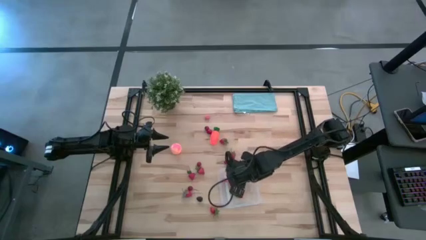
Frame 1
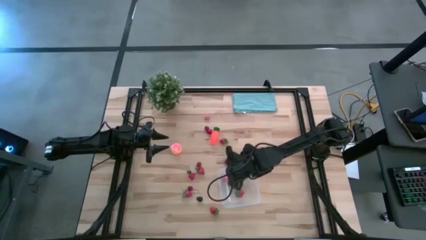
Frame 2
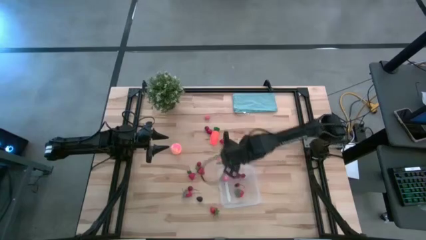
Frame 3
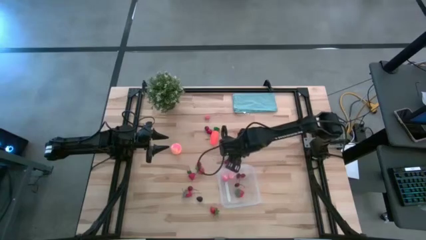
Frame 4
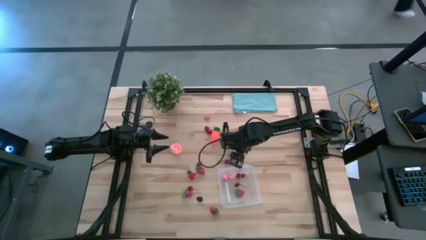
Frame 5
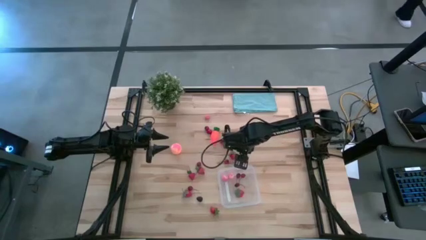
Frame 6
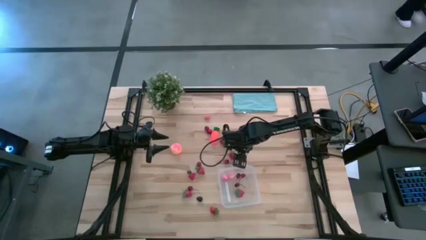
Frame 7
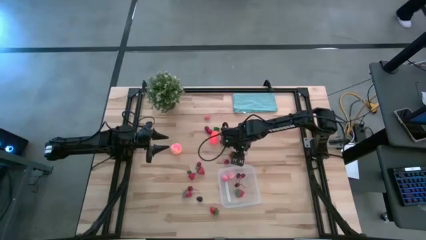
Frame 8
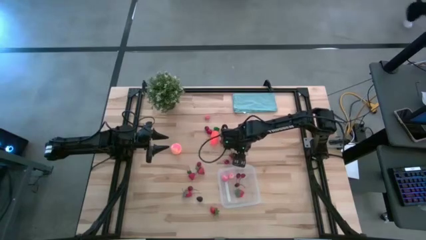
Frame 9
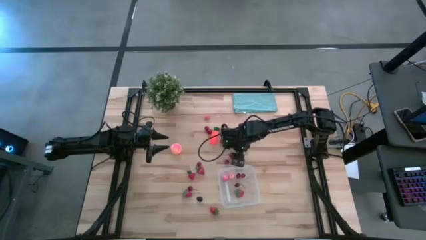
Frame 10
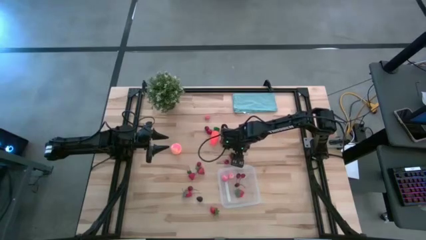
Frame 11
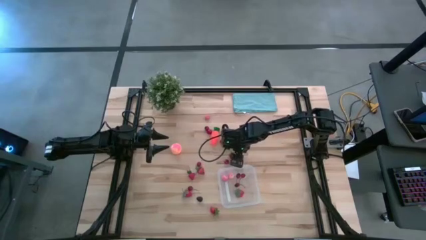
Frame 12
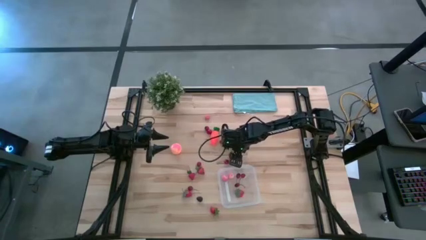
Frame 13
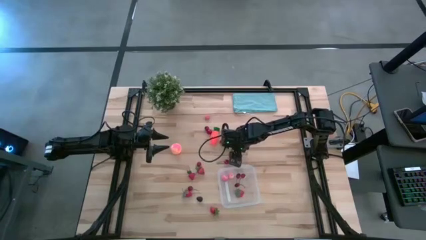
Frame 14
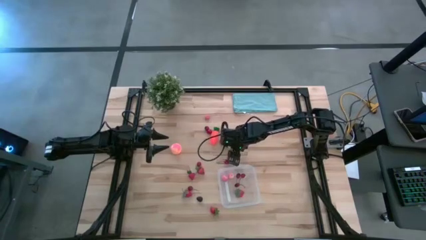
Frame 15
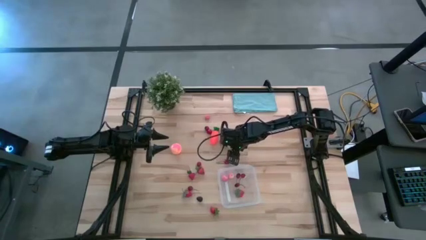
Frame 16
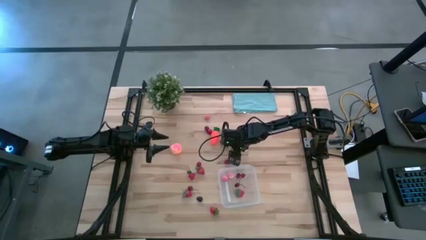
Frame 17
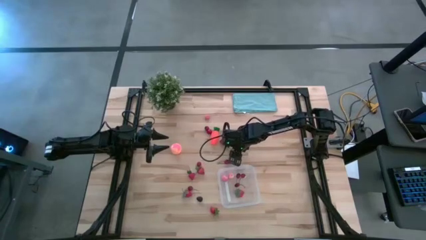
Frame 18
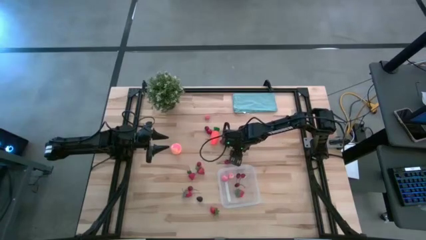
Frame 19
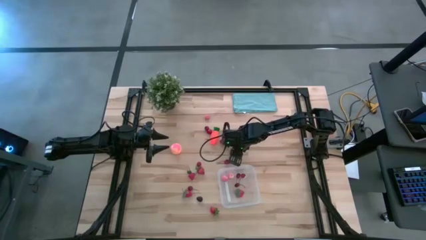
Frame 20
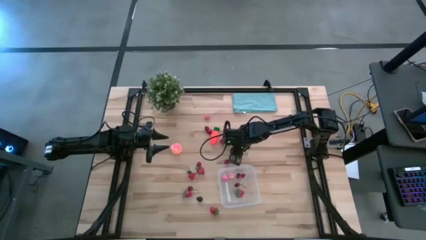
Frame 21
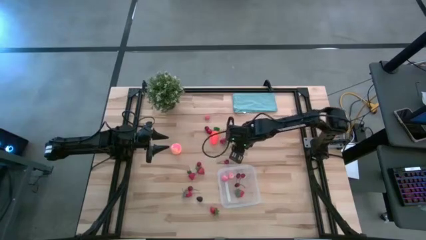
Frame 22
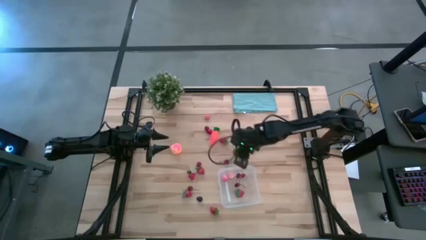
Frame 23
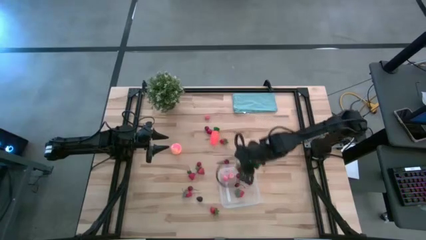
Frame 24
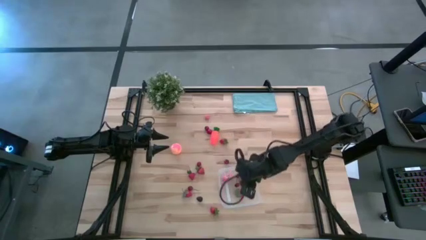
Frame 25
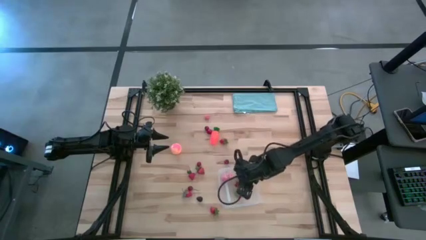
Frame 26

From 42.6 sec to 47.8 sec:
Task: Pick and placing Produce into tupperware
Put the red strawberry into the transparent container

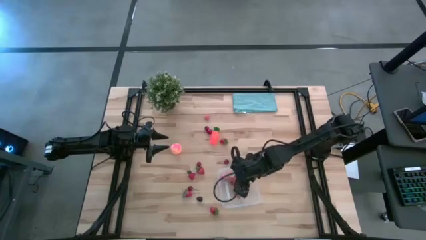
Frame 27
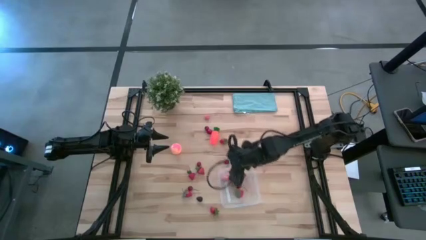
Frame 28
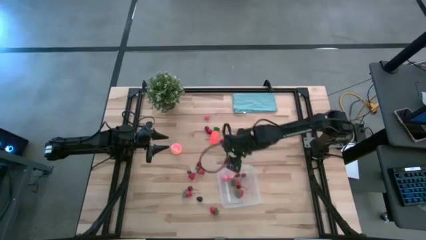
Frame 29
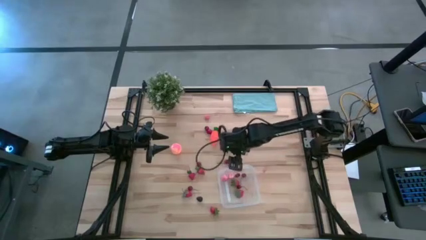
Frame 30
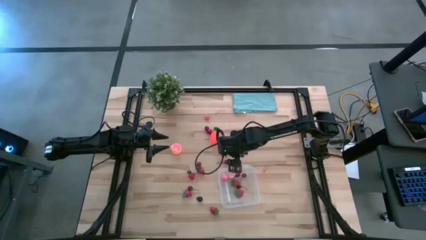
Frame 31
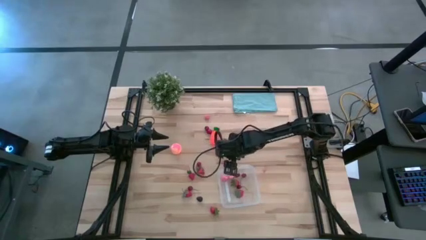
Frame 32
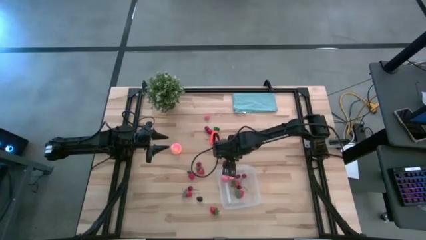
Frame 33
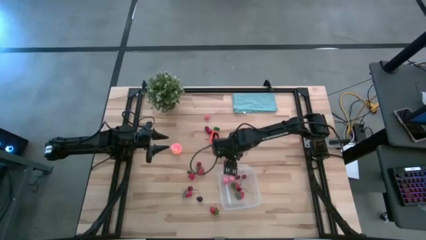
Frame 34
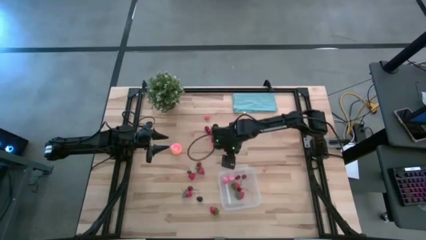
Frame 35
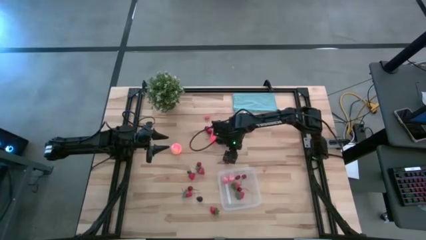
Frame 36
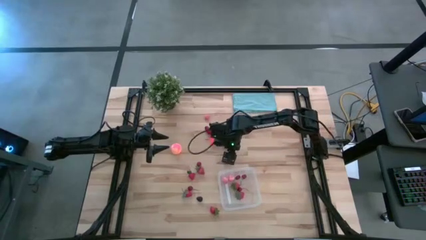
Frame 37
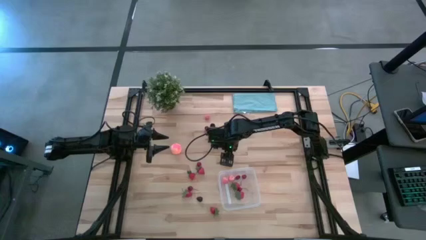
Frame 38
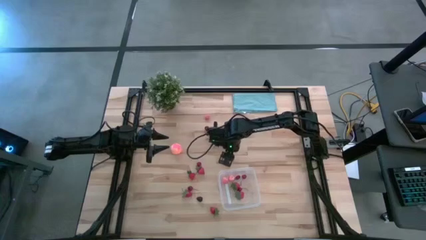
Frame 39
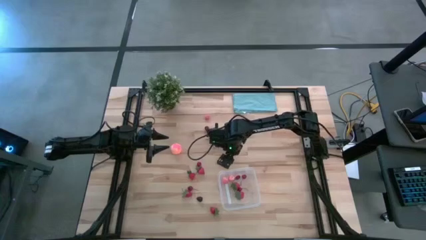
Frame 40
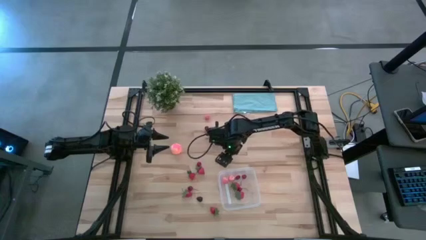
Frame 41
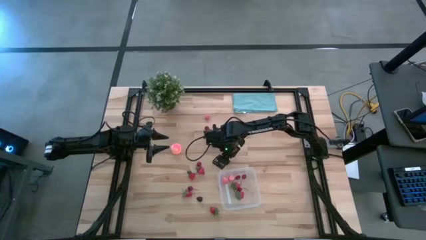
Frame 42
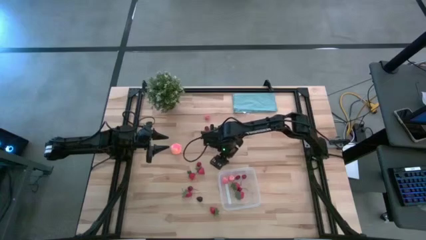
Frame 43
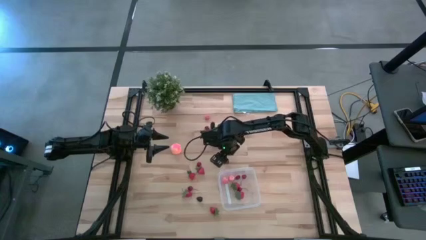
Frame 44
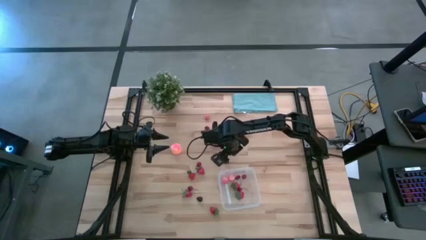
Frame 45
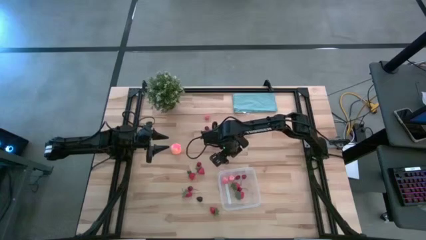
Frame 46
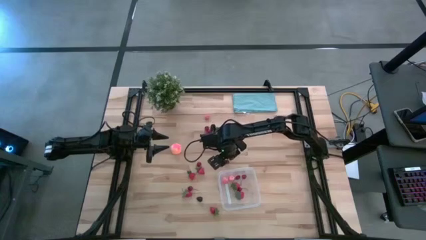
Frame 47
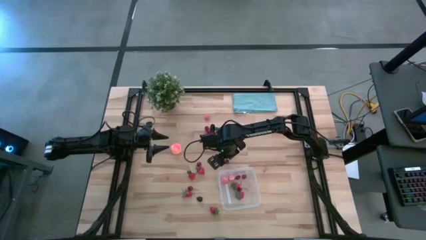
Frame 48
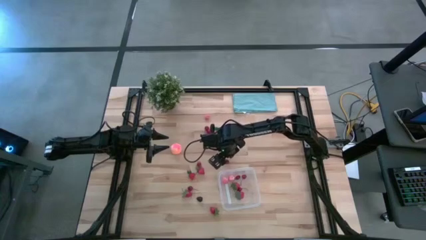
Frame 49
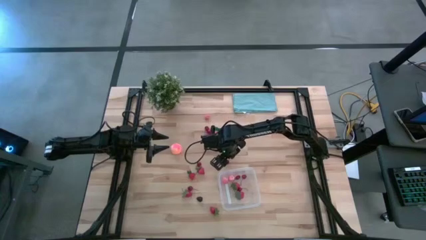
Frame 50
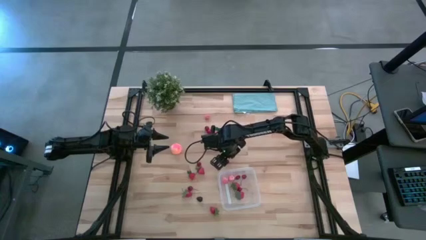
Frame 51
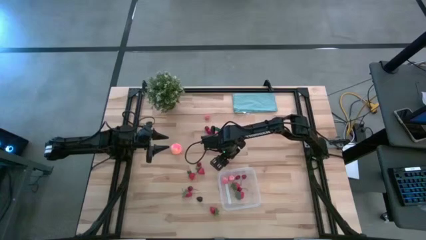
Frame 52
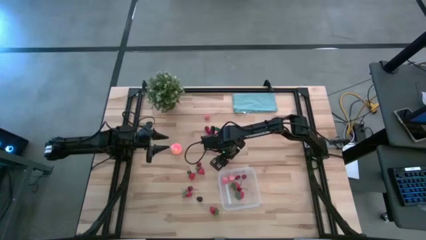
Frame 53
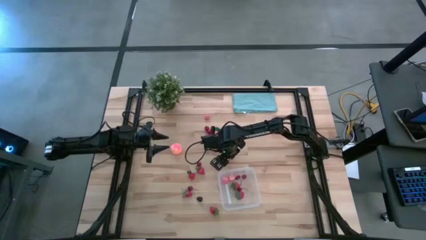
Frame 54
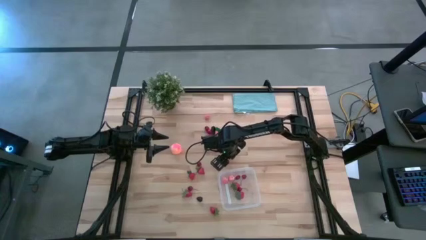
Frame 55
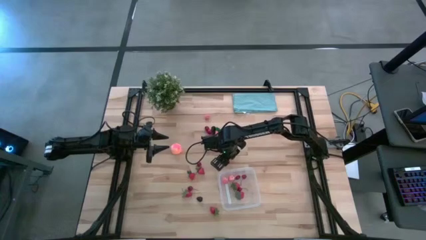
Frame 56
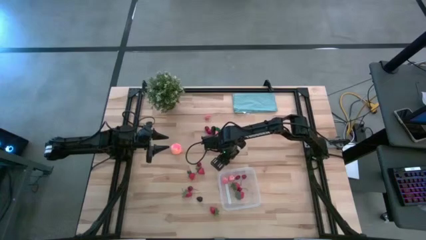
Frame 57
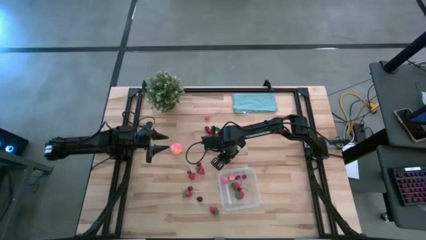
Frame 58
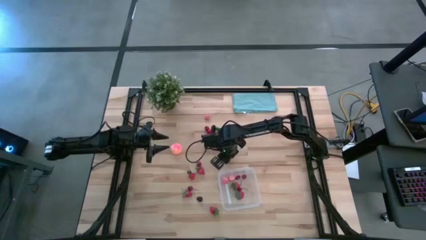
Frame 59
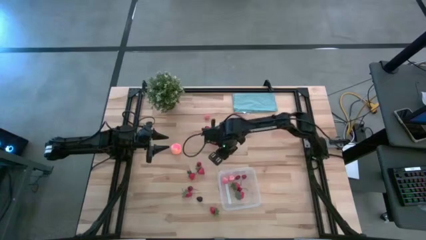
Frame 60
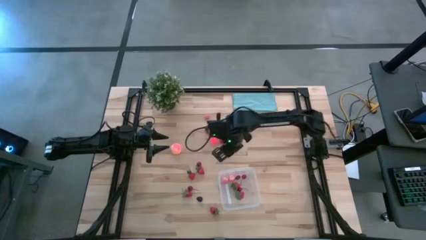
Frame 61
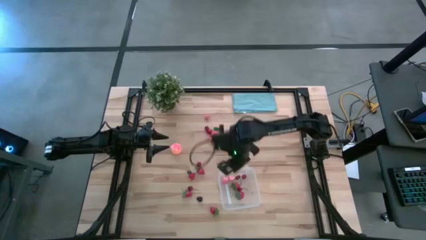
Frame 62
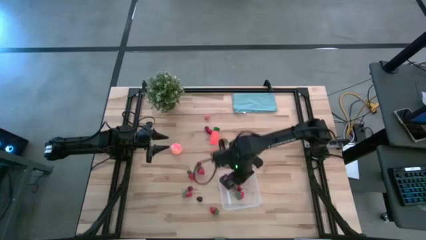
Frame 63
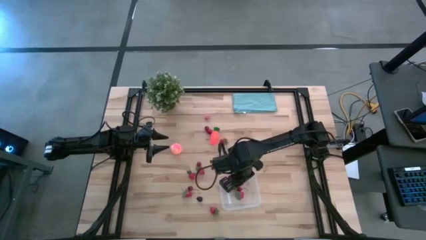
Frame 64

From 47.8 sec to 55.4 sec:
Put the red cherry into the transparent container

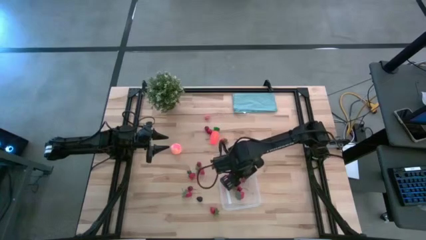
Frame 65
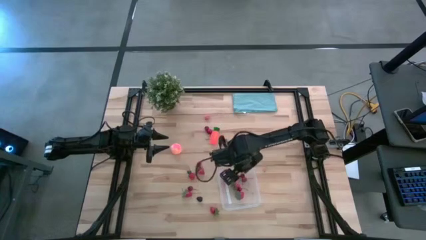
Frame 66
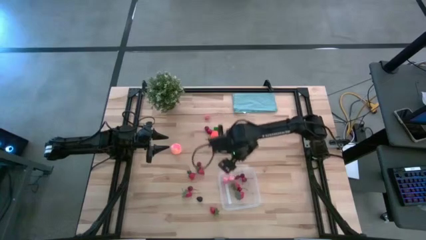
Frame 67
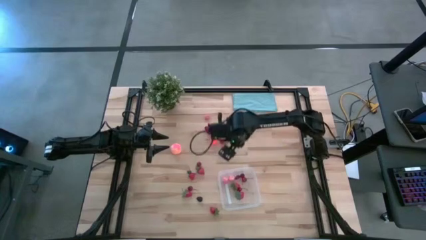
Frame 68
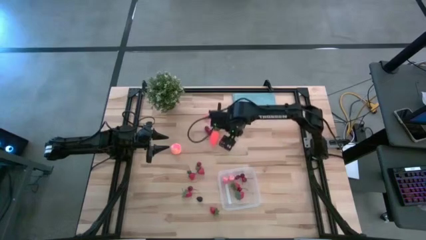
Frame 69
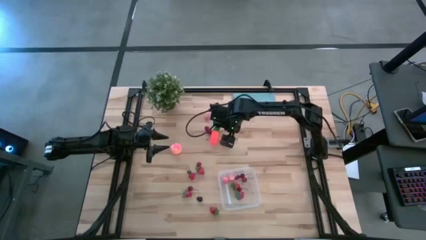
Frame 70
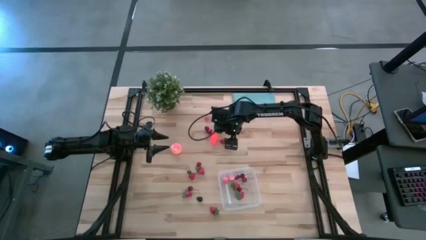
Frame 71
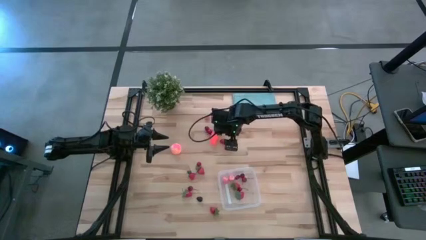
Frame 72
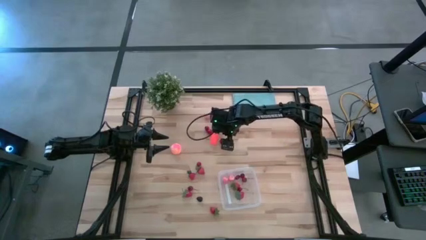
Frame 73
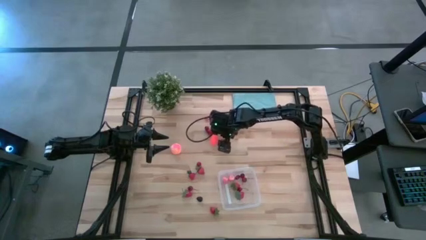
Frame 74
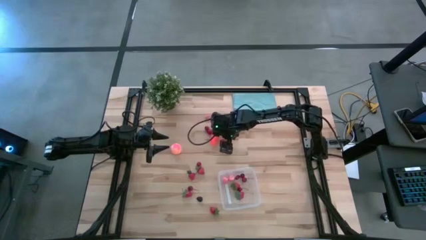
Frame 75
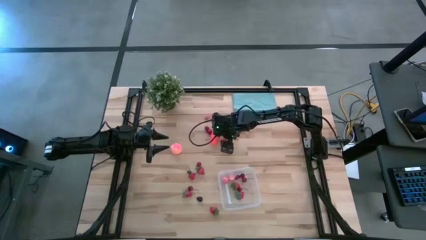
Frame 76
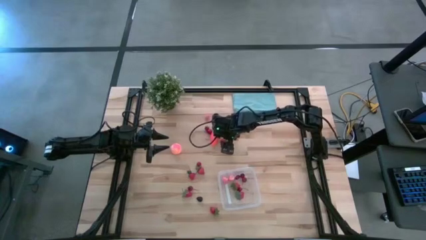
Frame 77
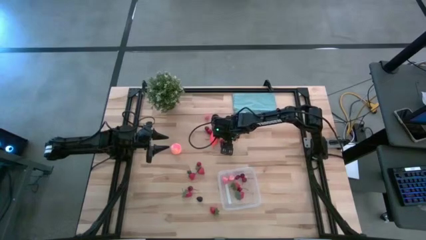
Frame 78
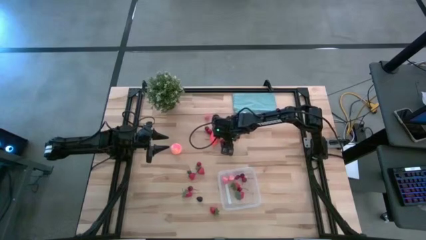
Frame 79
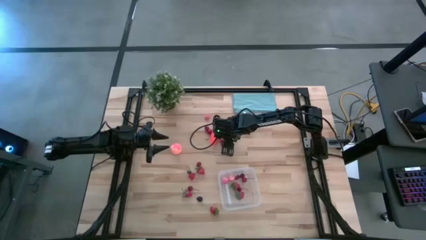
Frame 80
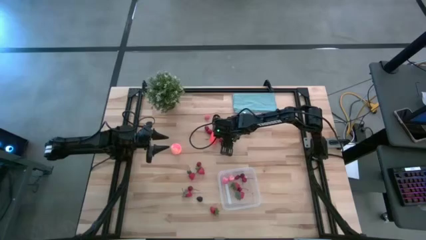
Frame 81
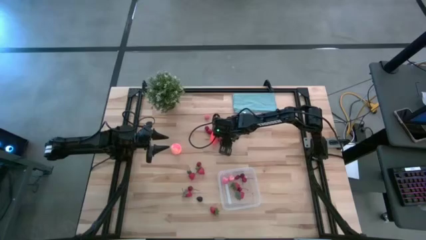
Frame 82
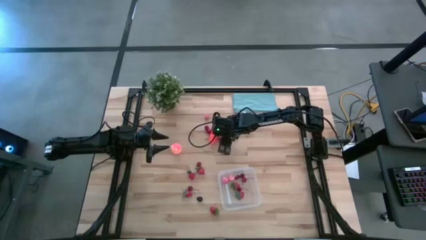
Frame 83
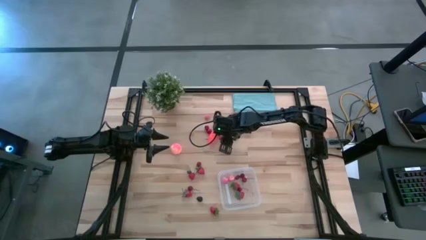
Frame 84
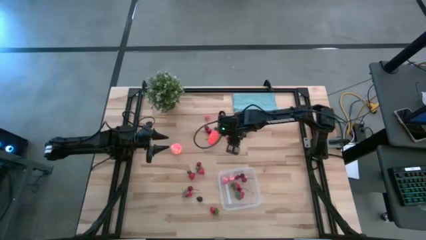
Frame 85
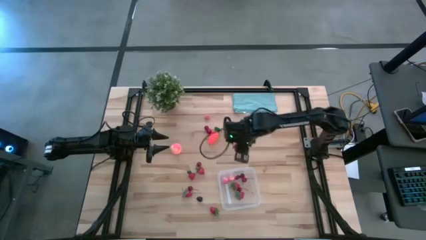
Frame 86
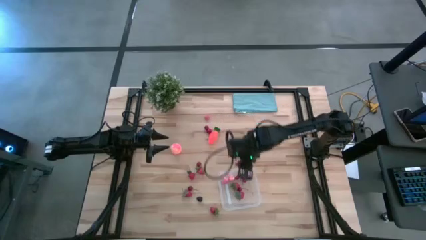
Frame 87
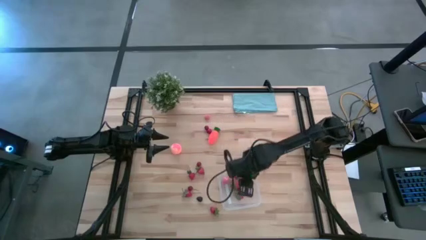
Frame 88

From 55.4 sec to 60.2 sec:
Put the red strawberry into the transparent container
